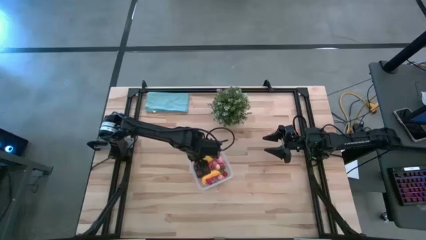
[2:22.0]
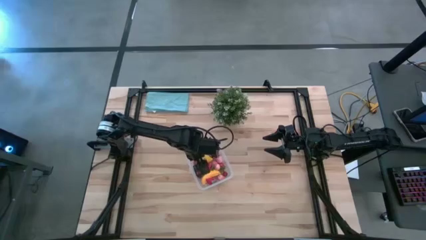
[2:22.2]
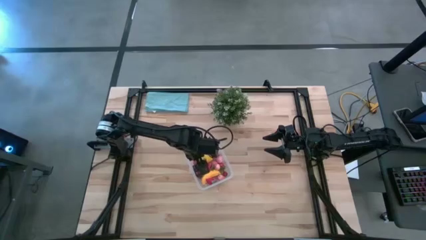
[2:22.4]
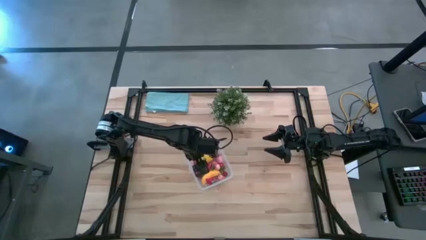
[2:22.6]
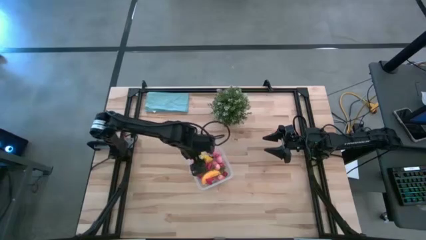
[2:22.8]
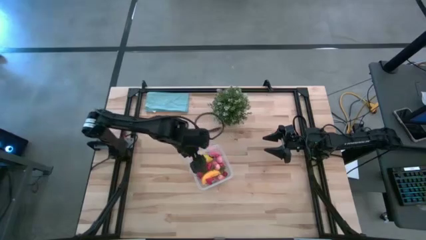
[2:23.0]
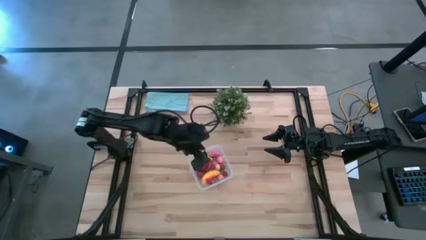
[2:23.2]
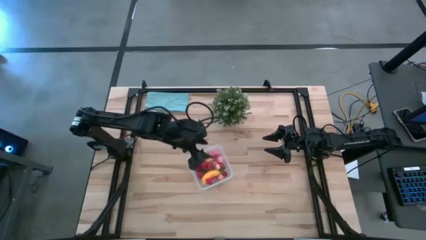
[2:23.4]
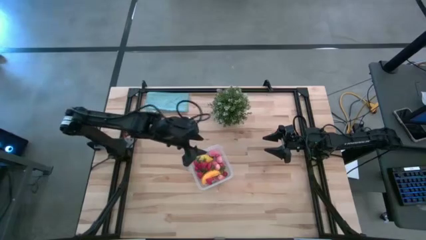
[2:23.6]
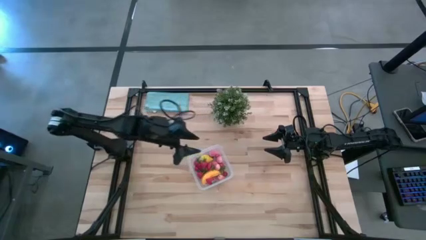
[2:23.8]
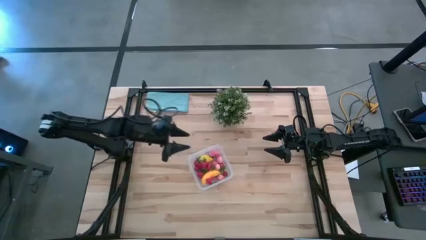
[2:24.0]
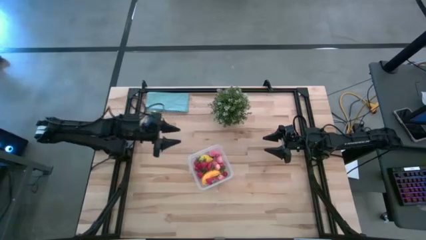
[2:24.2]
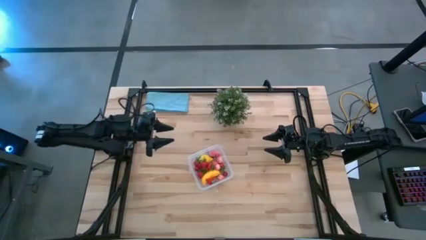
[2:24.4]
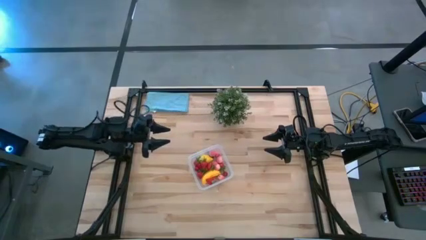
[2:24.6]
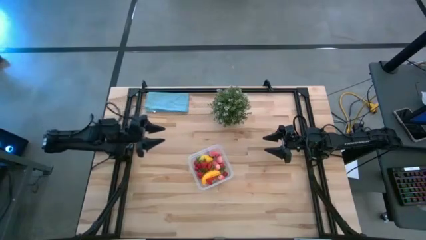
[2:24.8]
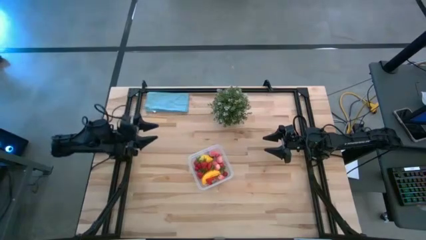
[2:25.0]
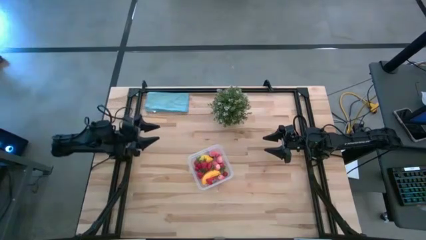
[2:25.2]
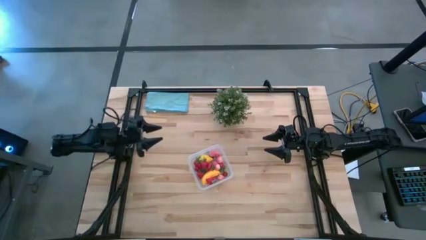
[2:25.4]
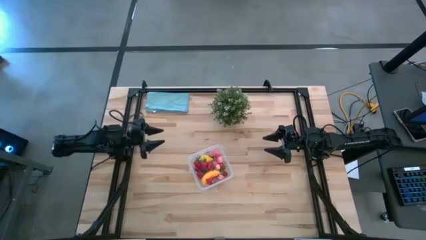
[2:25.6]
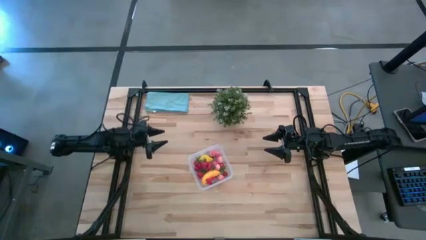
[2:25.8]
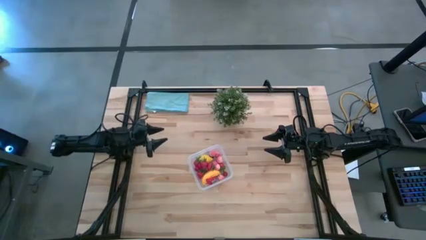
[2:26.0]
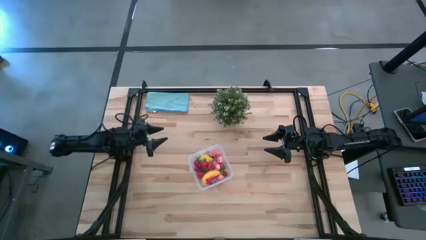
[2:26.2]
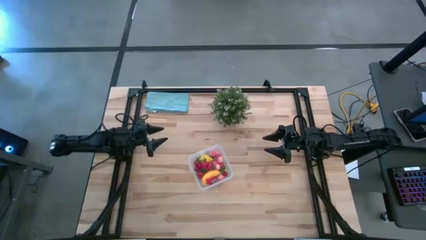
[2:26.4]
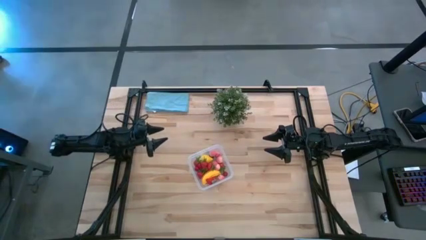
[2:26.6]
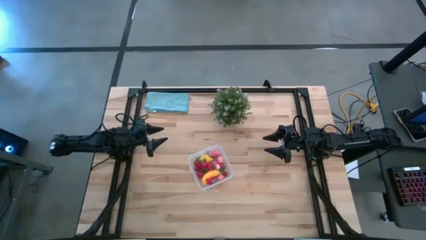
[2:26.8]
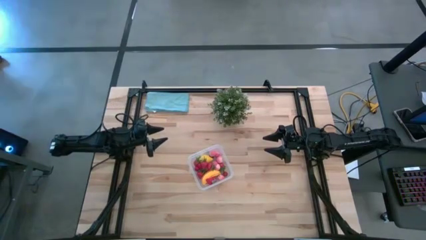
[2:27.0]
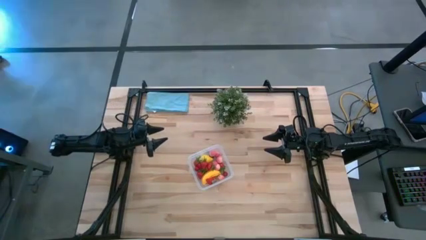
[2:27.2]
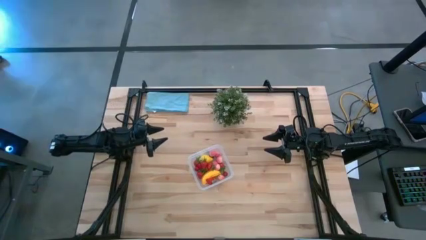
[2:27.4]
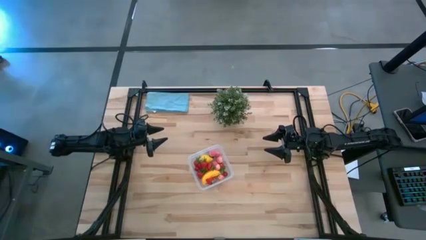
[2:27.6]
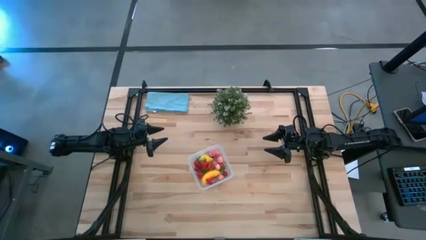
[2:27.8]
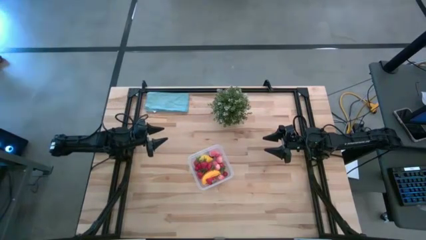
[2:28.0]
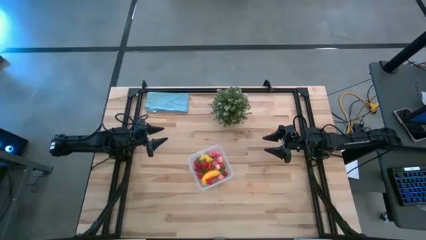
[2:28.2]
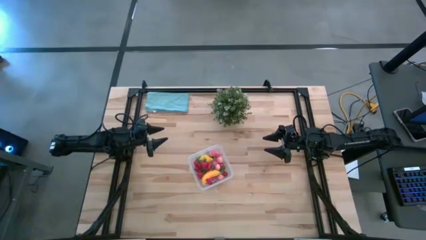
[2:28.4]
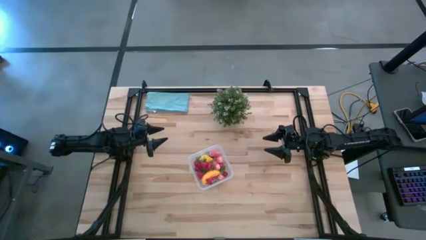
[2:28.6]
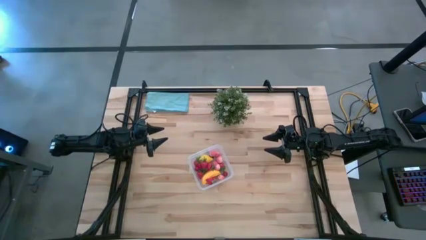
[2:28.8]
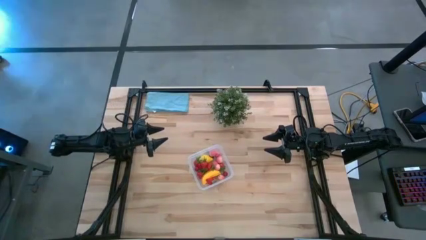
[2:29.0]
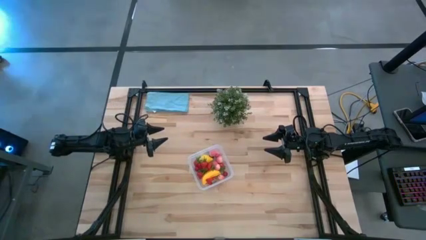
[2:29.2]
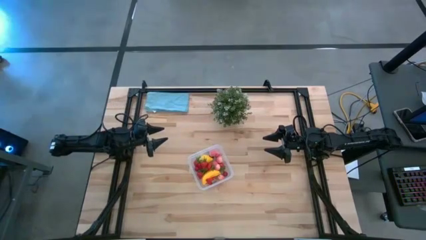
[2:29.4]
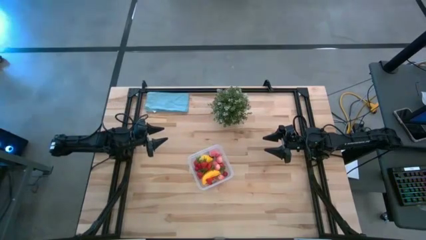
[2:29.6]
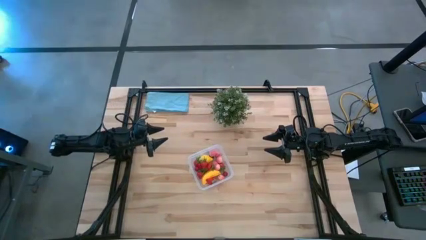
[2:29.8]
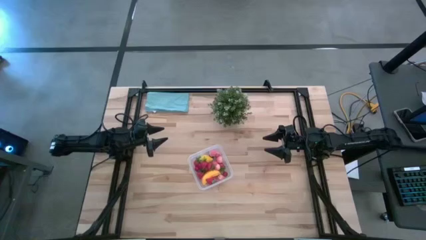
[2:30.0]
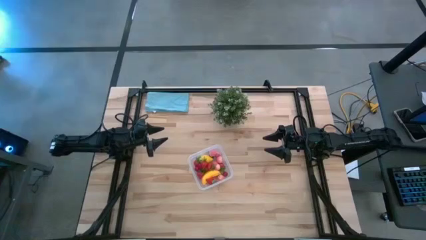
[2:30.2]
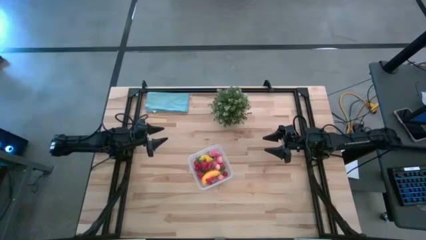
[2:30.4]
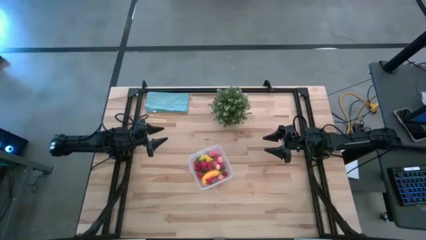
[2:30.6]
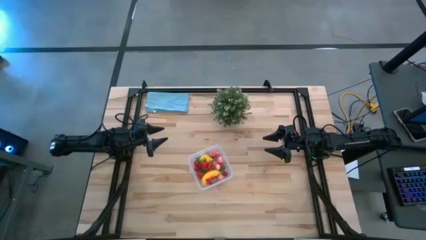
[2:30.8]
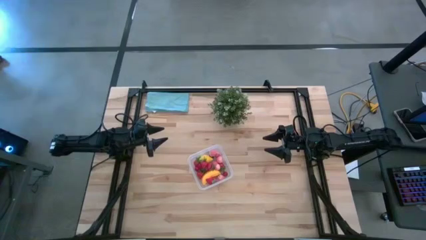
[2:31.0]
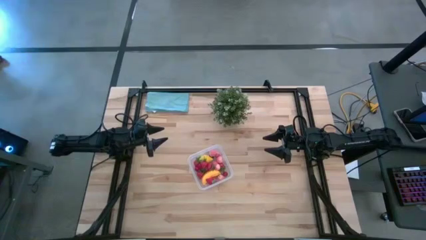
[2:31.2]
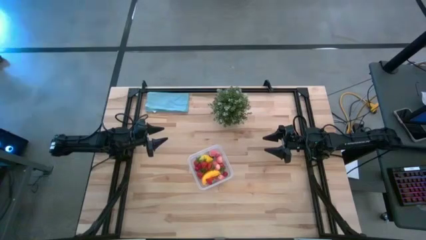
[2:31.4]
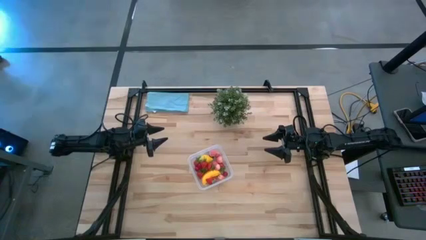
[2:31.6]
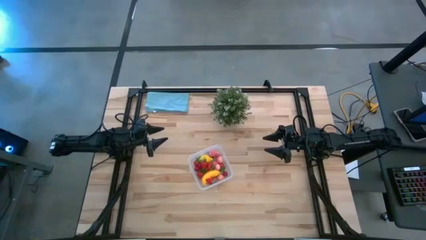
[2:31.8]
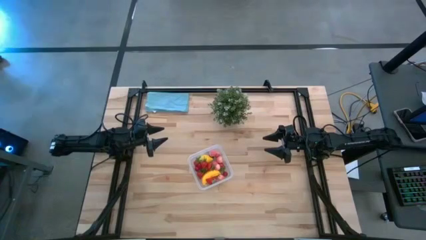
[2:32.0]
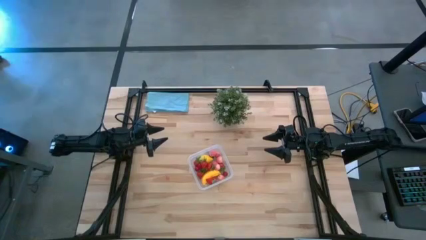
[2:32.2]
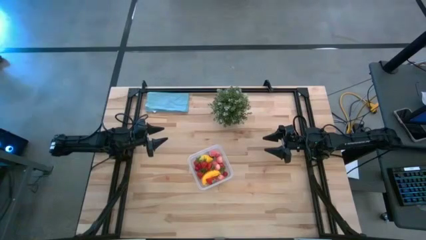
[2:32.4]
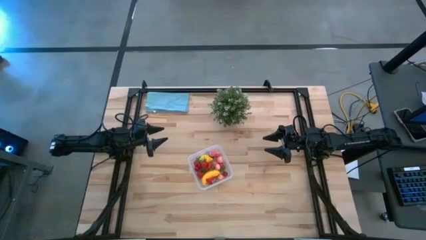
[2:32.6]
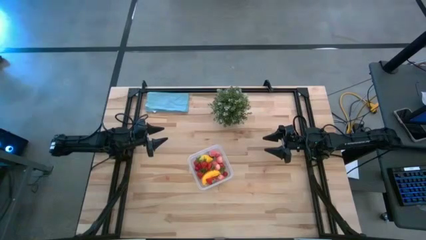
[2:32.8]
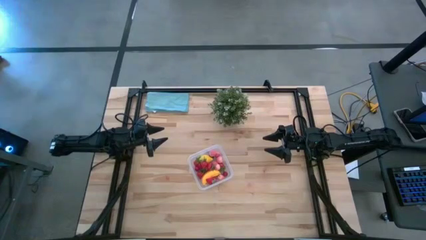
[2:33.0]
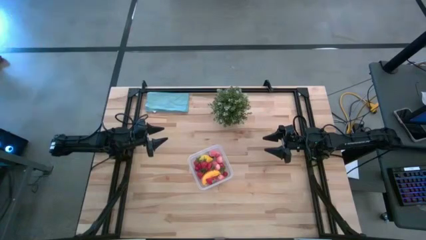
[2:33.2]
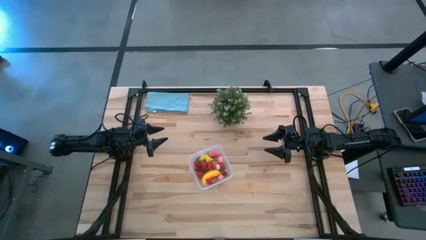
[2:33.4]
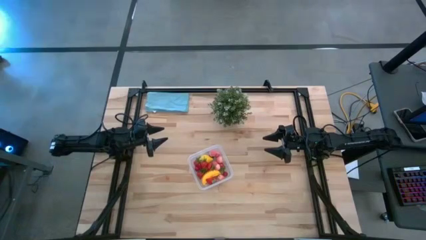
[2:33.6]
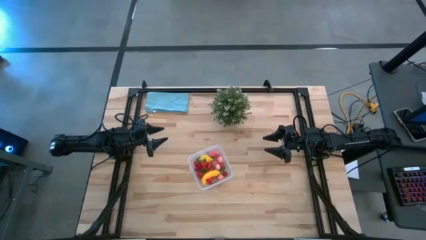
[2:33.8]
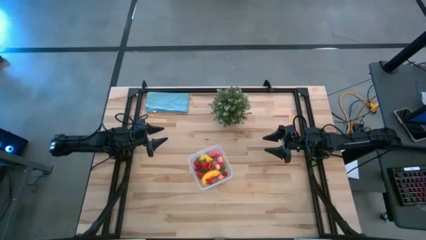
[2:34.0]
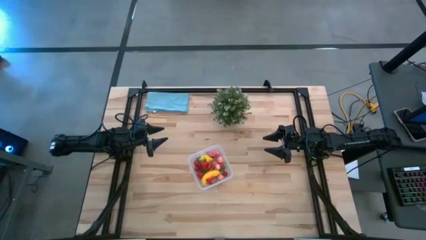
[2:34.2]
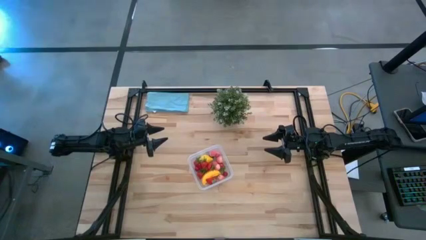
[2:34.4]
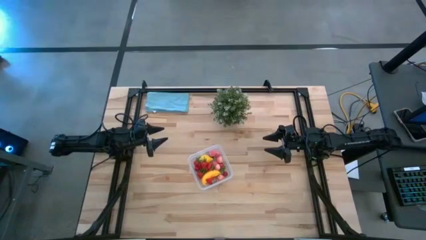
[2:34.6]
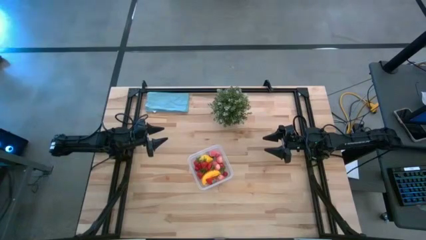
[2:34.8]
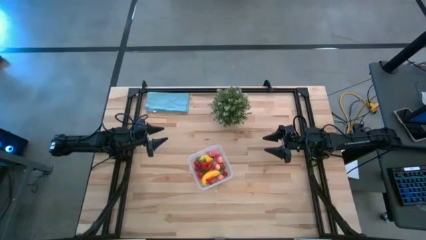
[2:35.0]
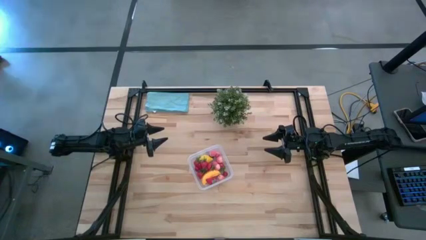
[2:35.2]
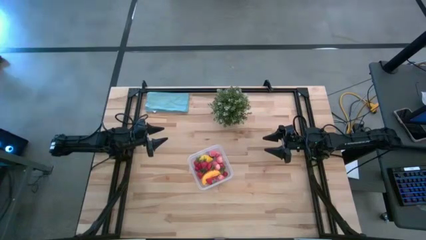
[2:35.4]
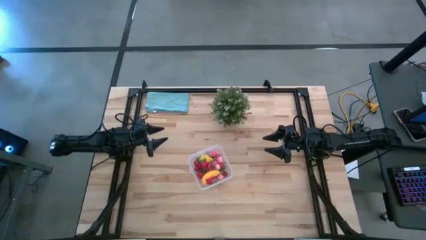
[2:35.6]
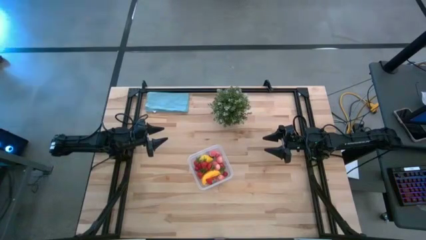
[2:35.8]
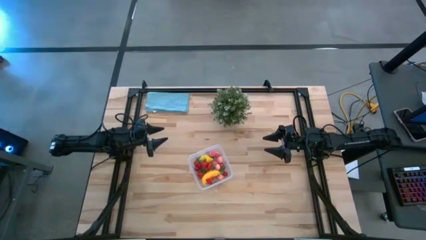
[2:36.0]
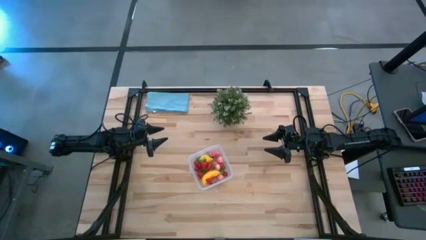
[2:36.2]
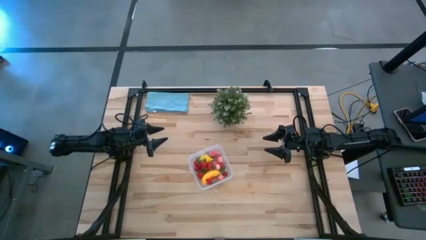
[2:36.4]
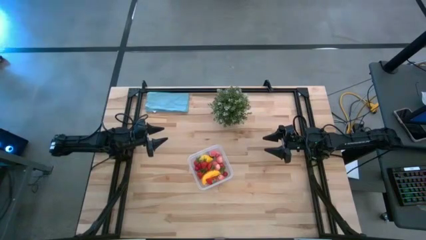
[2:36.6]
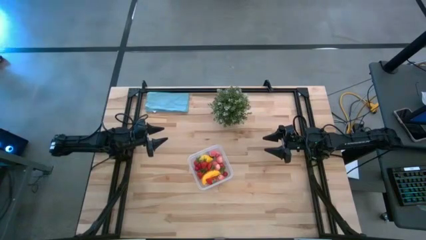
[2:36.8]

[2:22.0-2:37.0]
Task: Pick and placing Produce into tupperware
Return to Home Position

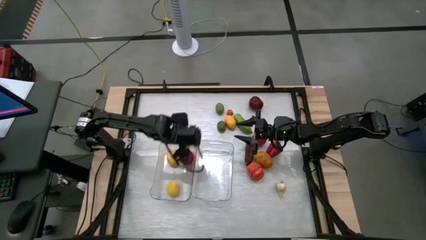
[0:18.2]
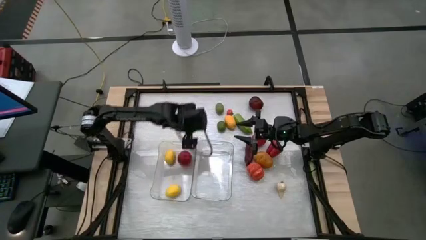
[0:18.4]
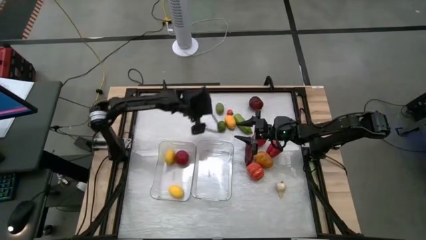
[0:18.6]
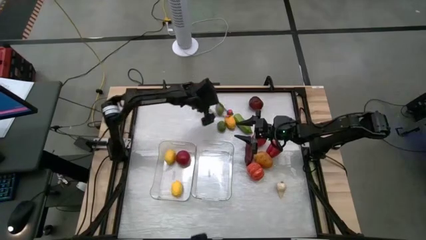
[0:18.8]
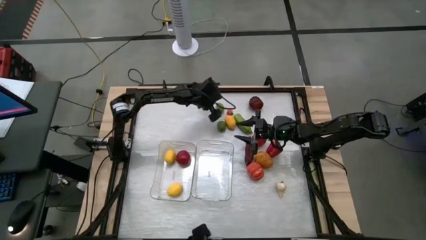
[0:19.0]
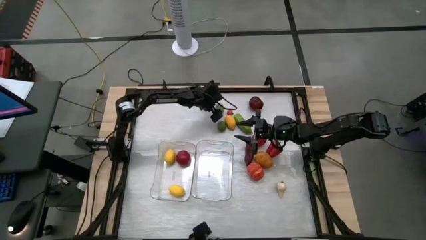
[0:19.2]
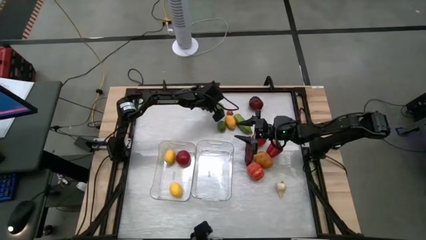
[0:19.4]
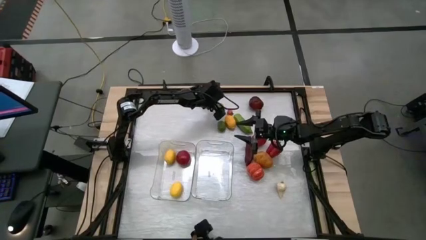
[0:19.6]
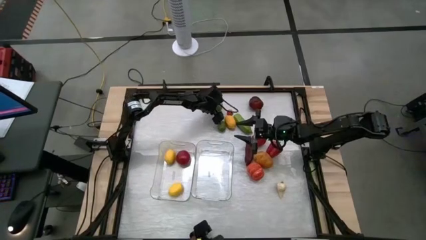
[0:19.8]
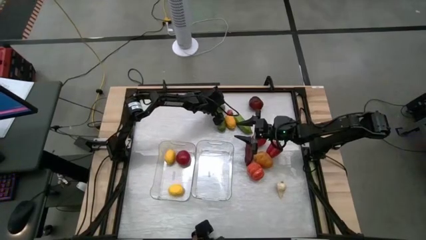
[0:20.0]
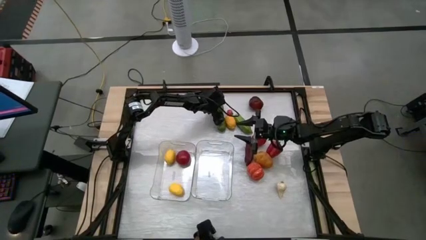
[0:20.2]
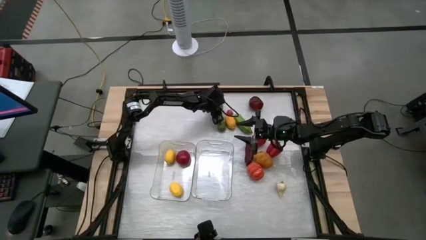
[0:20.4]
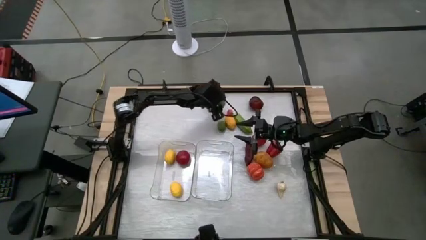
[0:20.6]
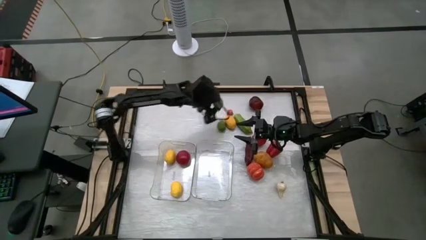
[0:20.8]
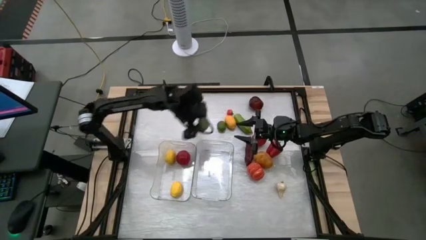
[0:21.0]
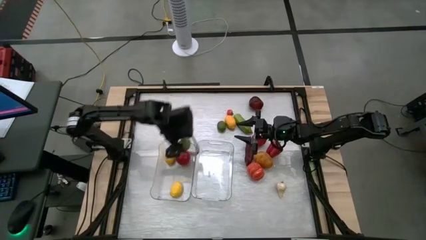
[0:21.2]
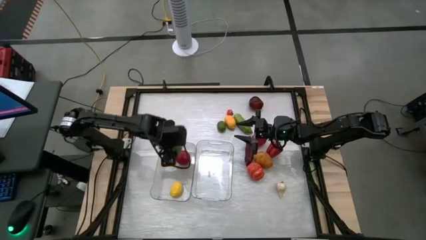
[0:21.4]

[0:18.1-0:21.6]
Task: Sort produce into baskets
Put the top green lime into the left transparent bin
